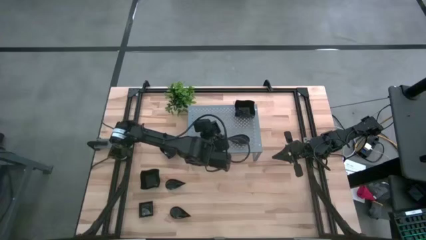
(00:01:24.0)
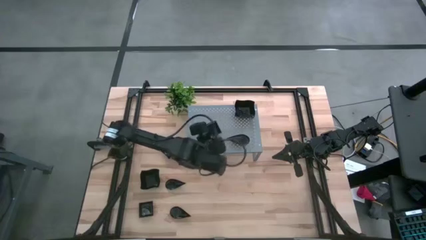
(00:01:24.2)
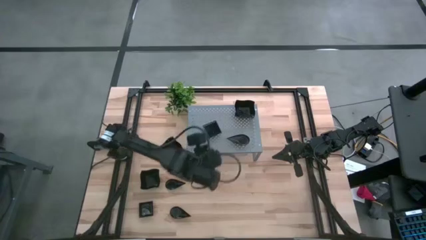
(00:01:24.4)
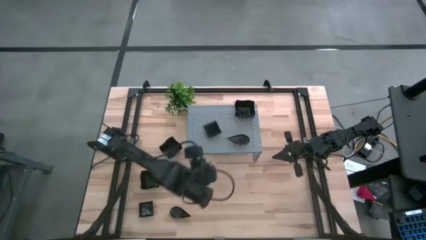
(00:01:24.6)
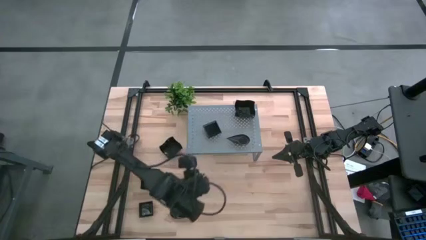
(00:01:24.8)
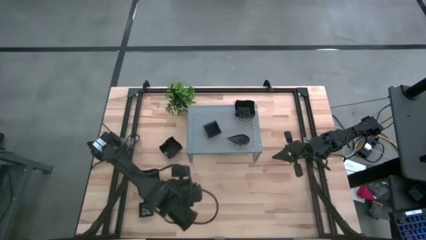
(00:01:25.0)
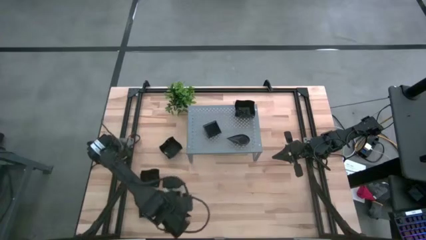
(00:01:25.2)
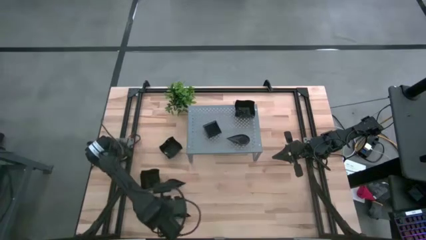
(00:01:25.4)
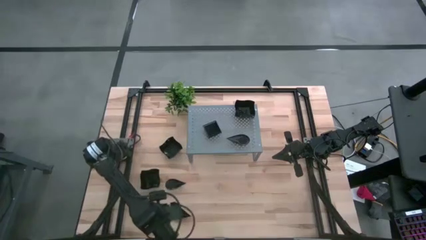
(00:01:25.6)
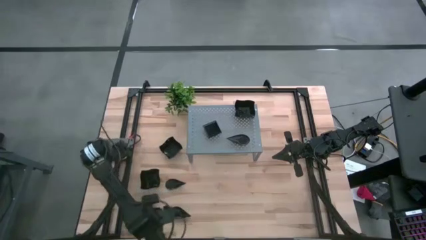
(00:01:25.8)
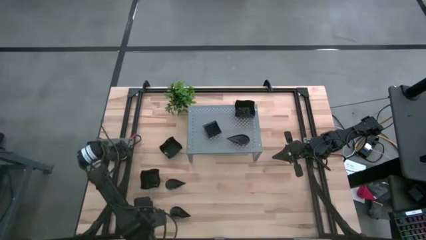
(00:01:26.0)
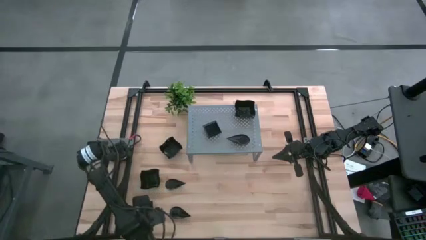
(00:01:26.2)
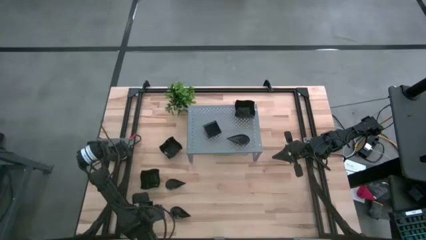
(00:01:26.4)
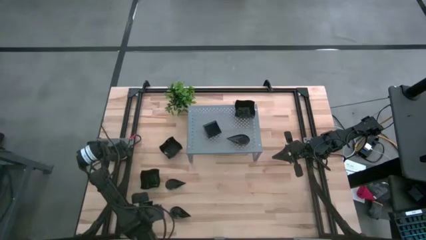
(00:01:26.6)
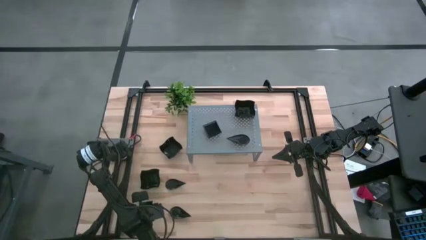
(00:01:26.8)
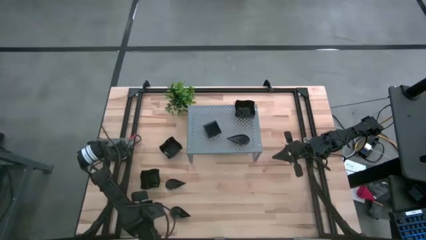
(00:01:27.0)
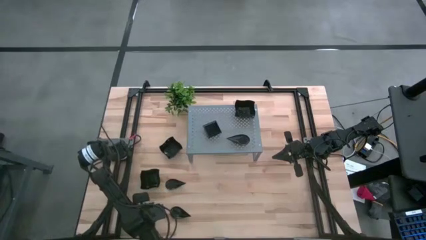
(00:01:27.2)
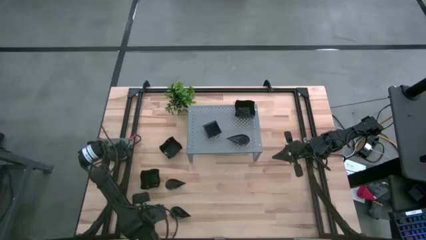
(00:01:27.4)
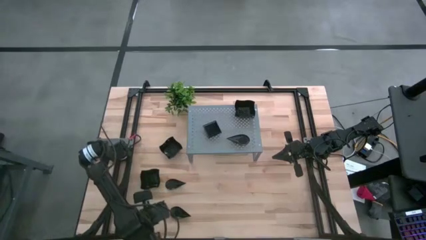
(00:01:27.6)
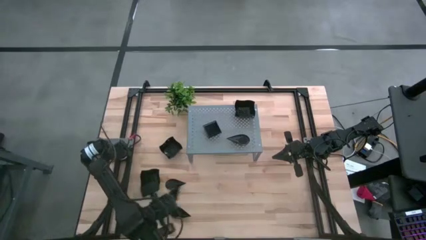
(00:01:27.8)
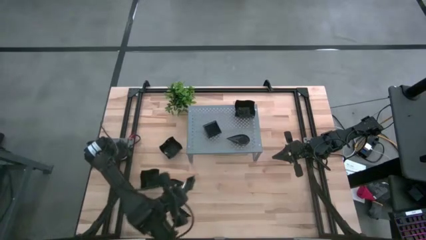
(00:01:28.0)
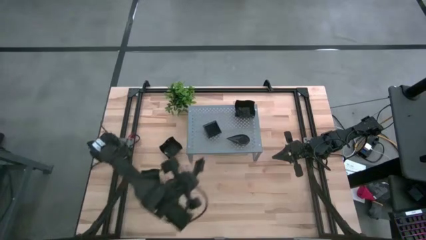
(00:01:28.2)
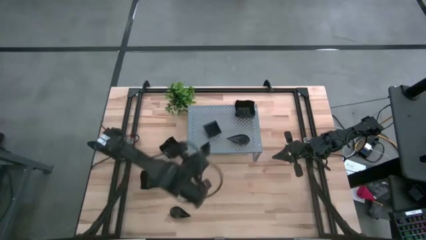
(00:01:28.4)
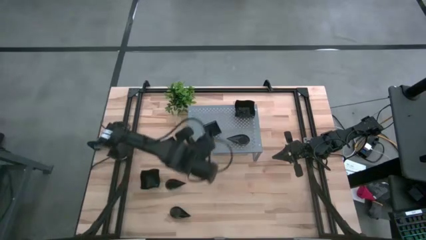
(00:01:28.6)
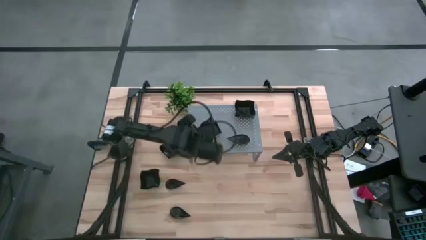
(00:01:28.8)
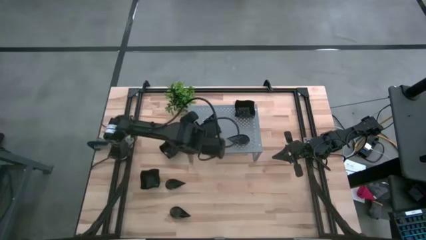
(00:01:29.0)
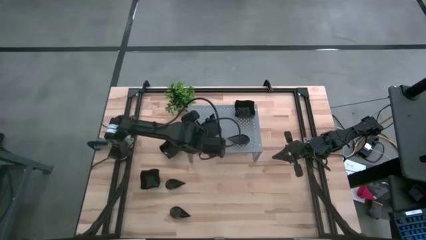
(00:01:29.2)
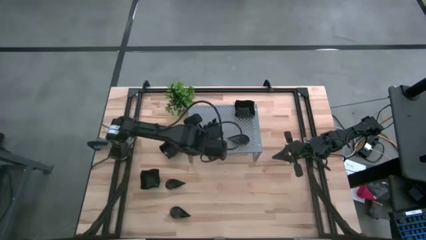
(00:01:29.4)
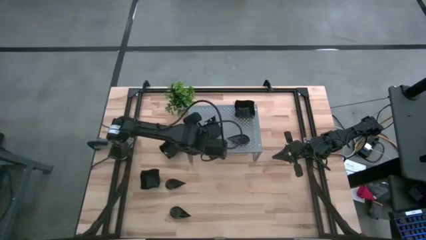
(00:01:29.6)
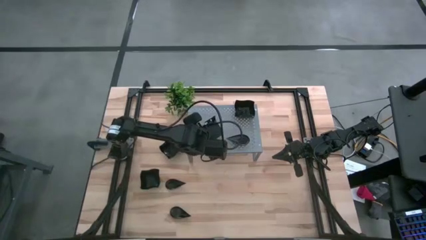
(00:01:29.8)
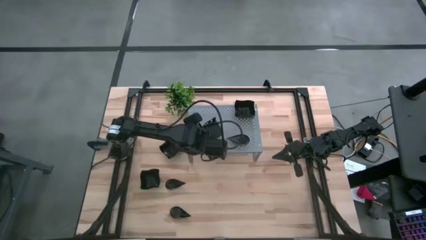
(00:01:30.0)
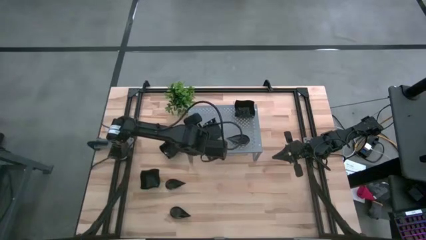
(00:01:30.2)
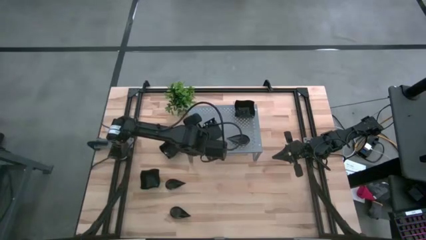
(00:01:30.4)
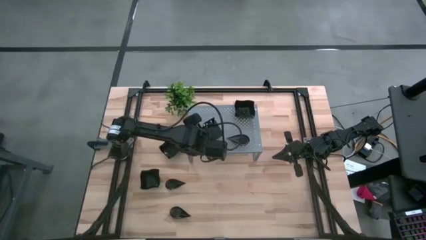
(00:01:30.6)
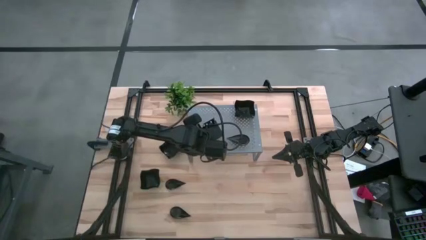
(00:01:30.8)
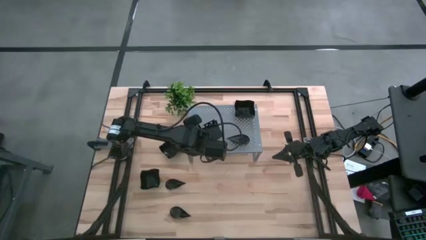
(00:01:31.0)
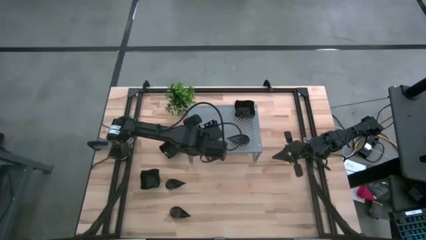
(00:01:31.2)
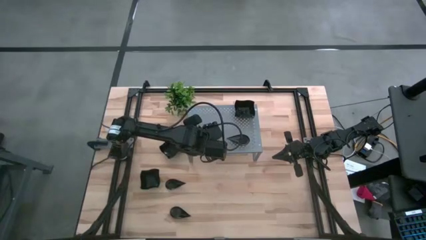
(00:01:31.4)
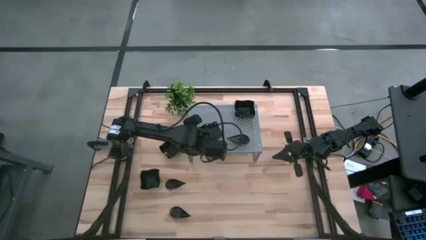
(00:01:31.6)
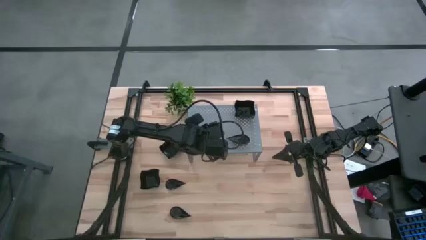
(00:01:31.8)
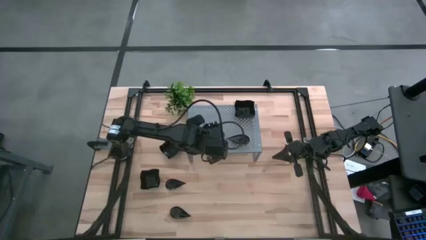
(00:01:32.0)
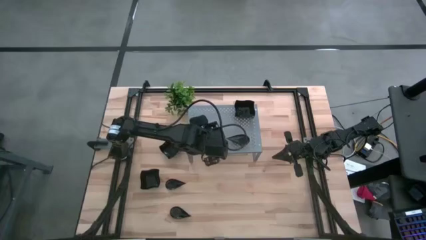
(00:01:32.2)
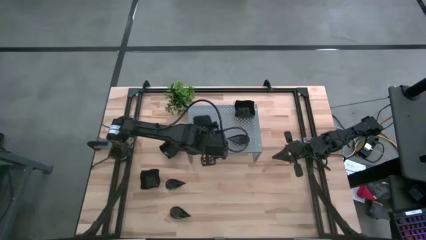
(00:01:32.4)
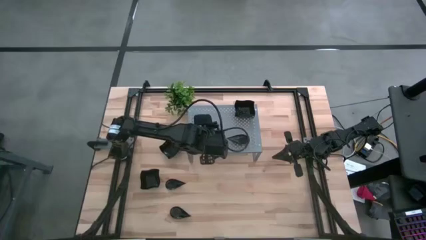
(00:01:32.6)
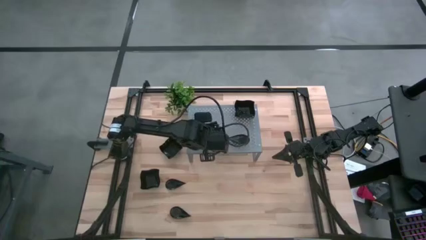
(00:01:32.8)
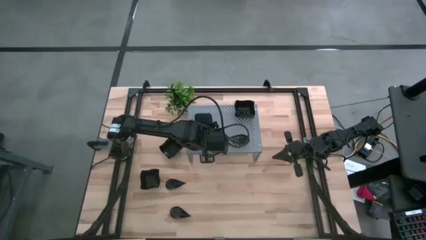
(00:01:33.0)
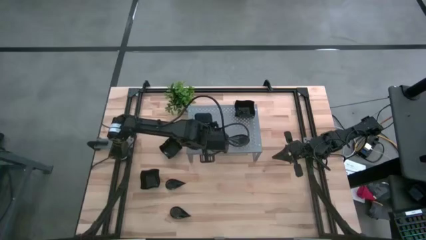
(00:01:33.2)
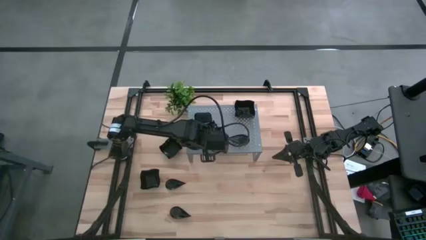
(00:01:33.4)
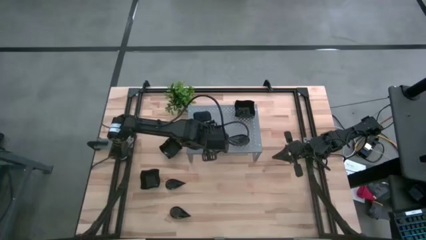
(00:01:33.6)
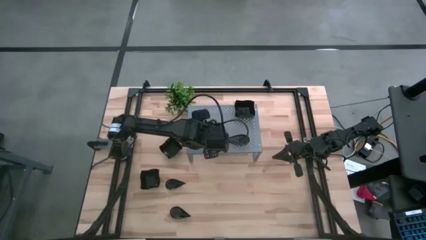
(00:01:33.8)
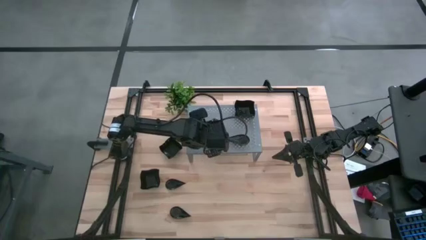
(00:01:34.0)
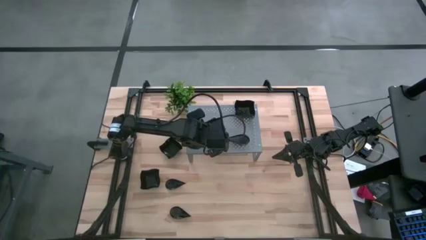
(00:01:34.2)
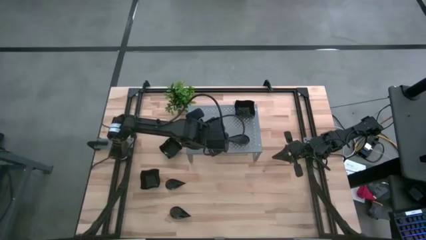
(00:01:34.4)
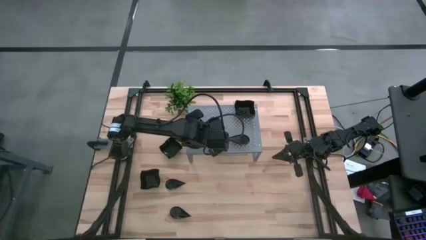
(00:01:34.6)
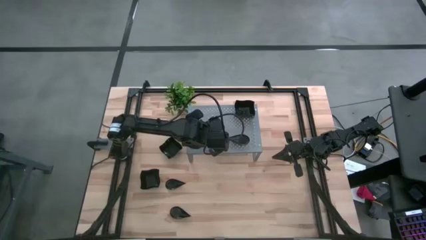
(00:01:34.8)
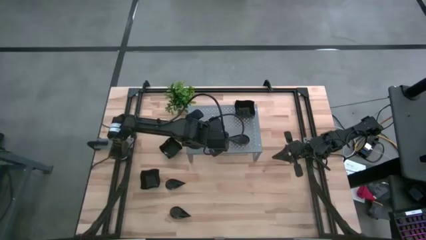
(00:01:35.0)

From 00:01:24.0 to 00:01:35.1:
Task: Pick & Place Mini shaped plates
Stack the black square plate on top of the black square plate on the shelf

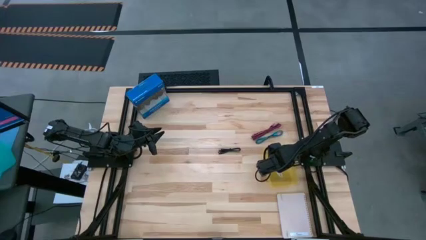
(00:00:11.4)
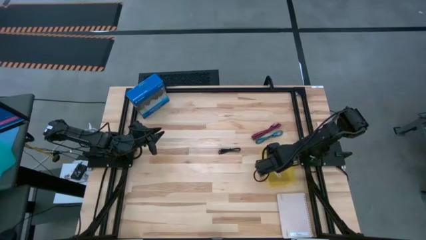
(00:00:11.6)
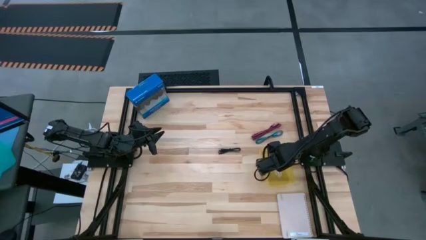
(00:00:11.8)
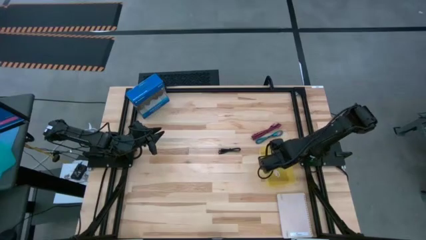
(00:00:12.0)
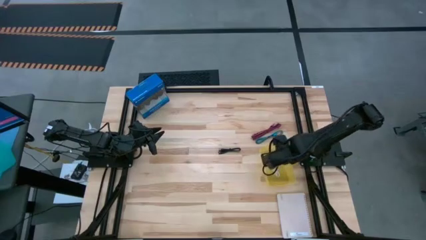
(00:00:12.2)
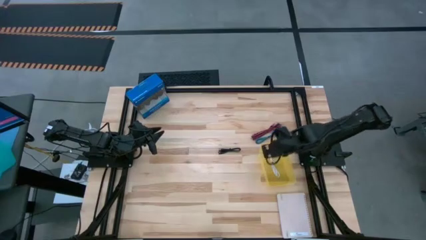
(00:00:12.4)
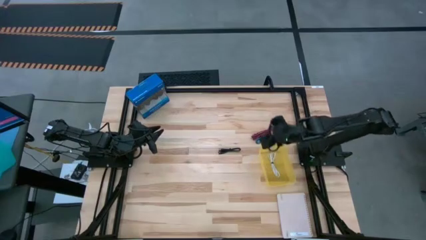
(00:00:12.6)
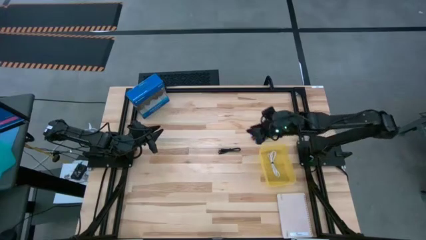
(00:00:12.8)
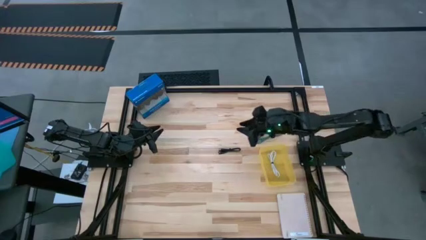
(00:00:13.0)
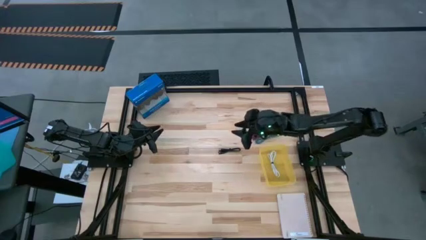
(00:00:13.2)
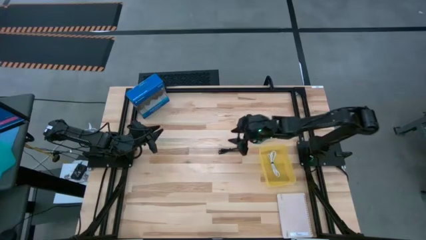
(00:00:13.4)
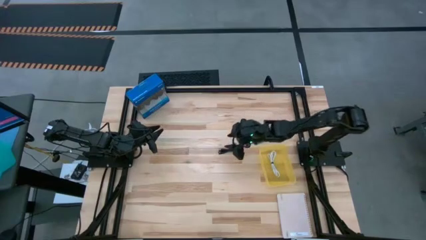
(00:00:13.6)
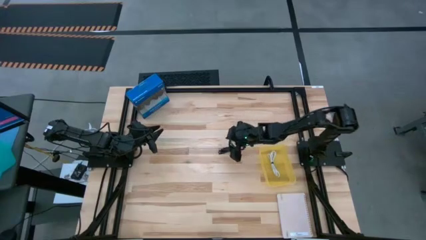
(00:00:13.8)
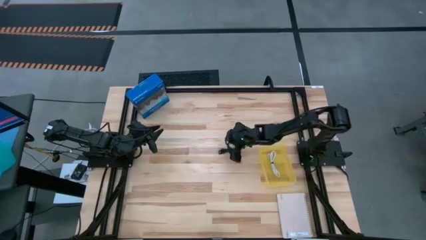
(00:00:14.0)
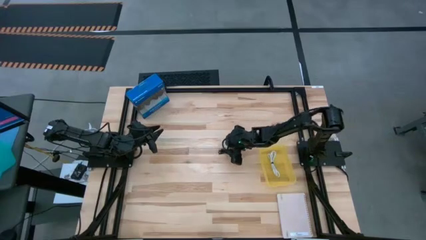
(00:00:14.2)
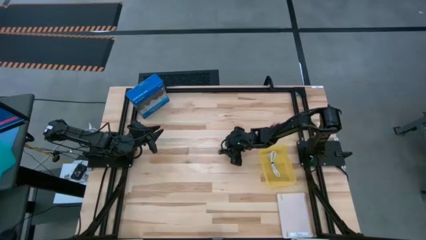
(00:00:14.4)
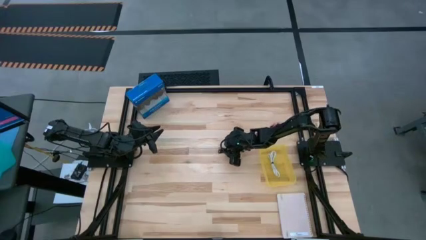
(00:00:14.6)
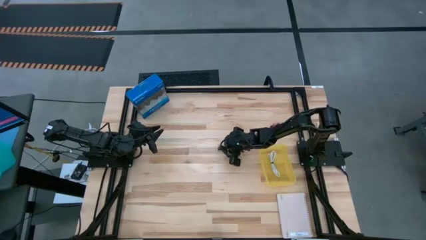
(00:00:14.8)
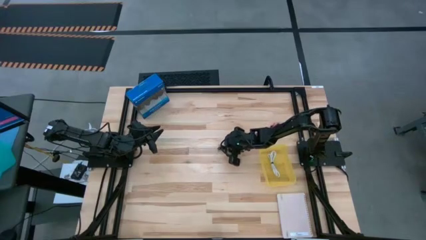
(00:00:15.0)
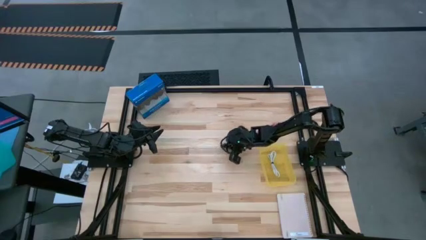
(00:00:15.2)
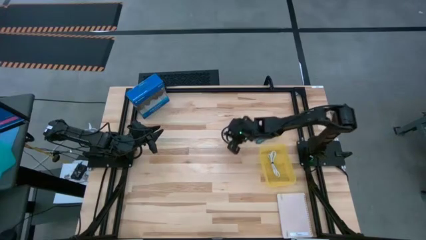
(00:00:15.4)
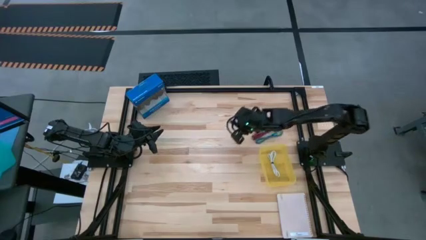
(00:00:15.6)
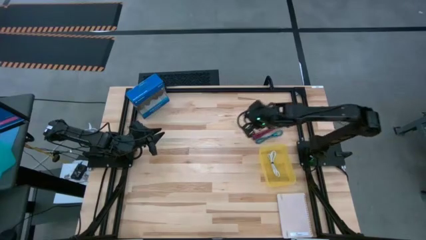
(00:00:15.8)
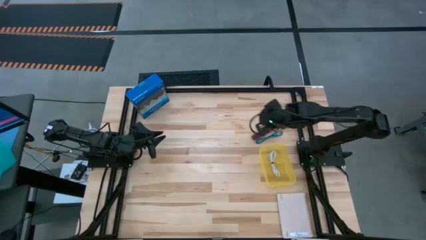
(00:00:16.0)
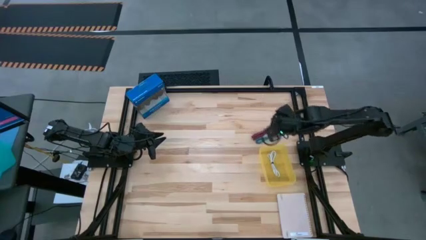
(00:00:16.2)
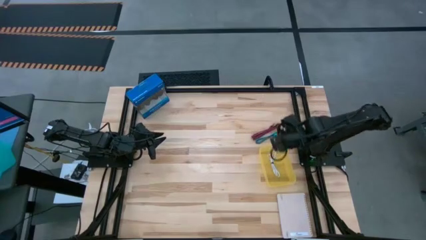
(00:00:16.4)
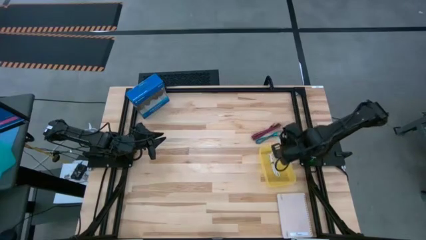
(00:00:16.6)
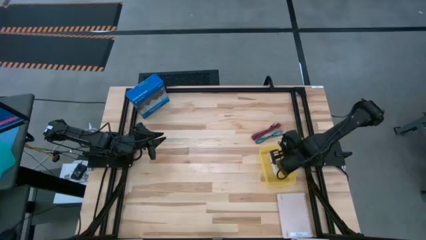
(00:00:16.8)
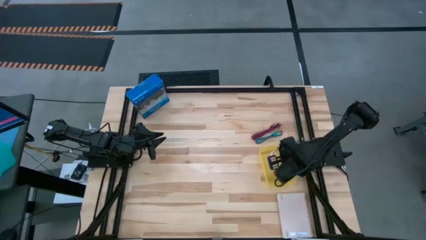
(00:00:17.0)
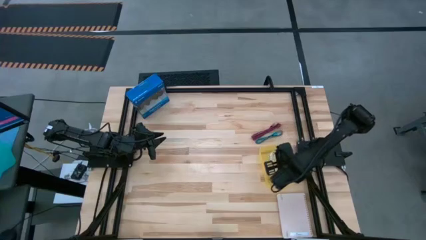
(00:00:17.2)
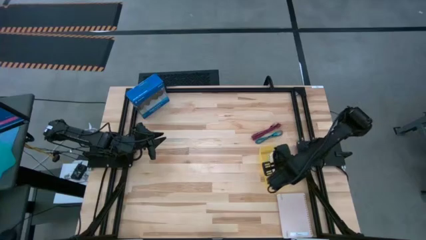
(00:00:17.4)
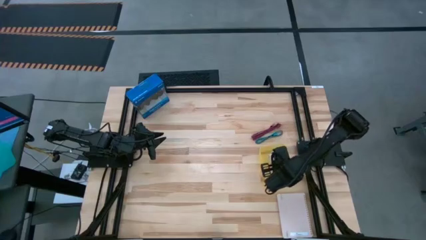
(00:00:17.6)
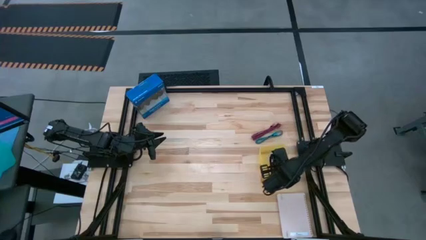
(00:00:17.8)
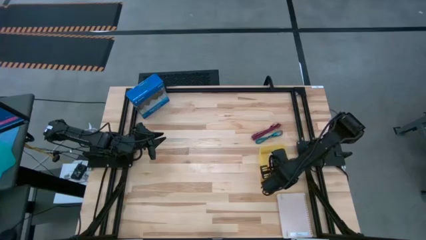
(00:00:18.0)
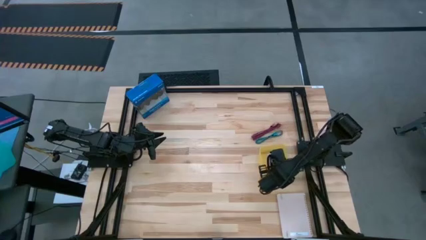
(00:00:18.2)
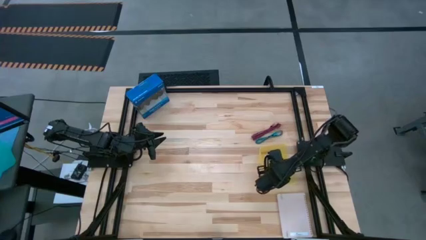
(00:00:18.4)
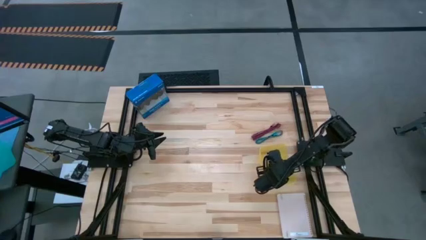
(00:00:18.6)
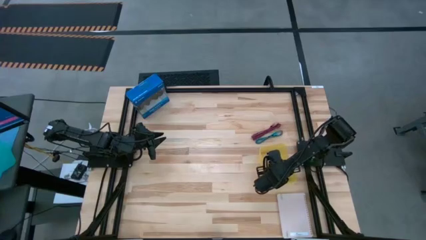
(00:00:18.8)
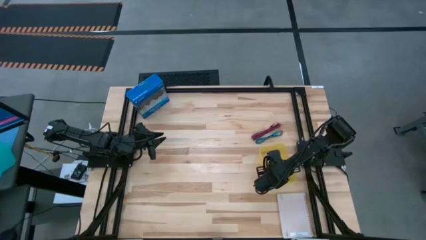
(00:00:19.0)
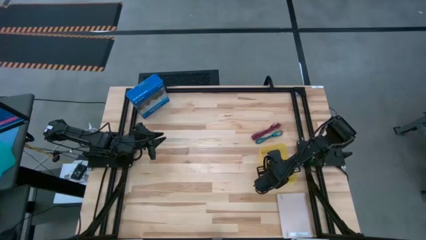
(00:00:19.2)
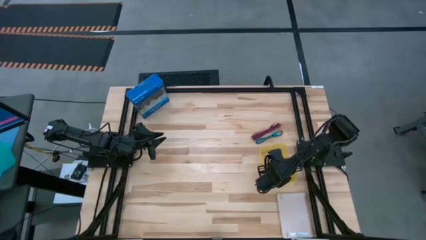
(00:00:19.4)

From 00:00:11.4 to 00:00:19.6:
Task: Pick and place USB-C Cables
Put the black charger cable into the yellow bin
